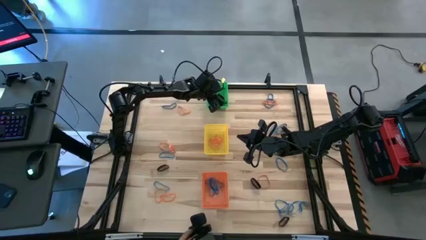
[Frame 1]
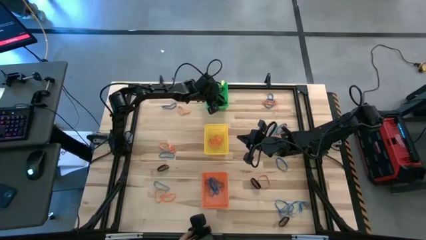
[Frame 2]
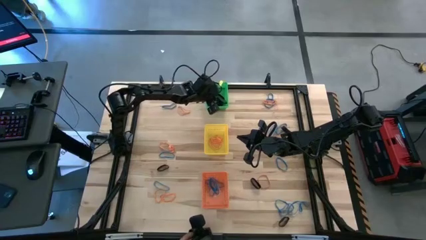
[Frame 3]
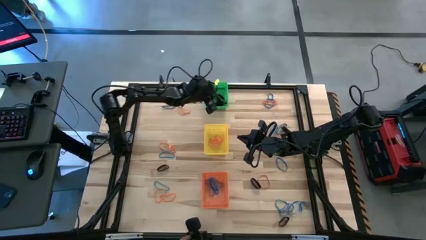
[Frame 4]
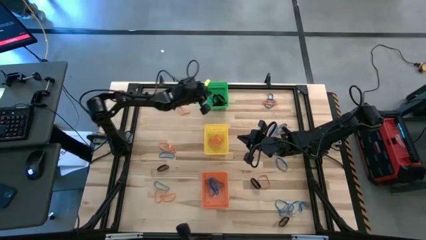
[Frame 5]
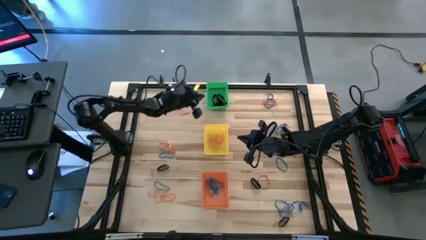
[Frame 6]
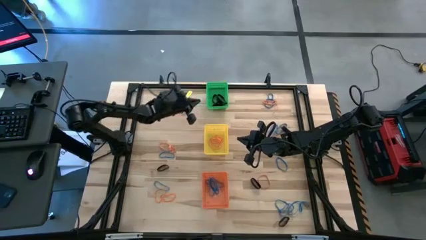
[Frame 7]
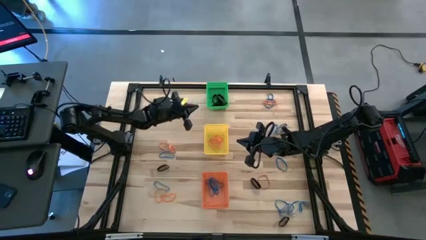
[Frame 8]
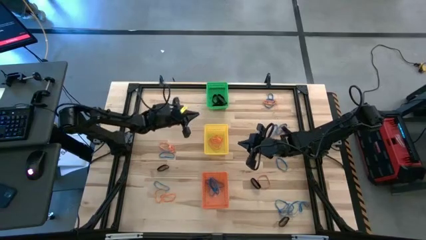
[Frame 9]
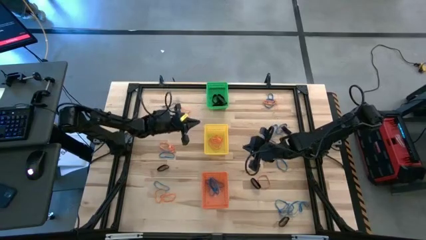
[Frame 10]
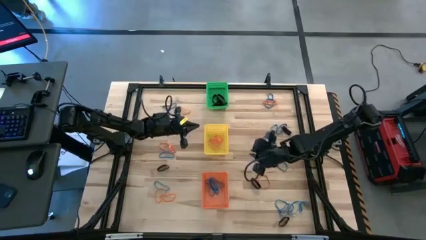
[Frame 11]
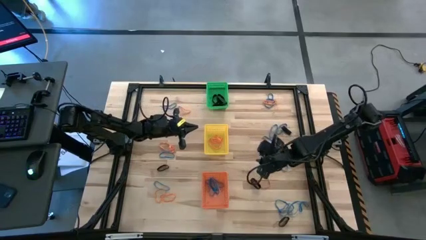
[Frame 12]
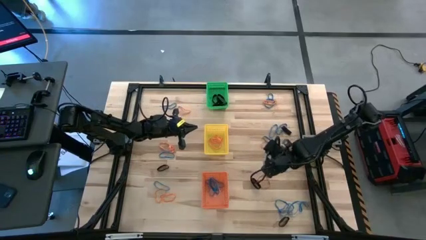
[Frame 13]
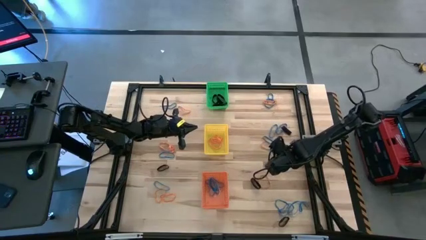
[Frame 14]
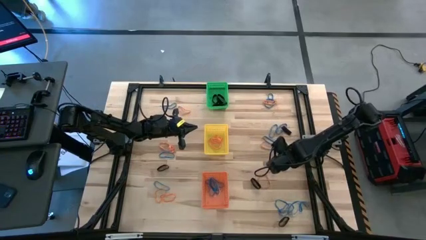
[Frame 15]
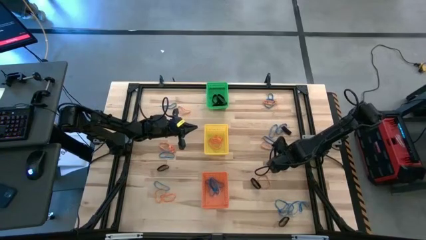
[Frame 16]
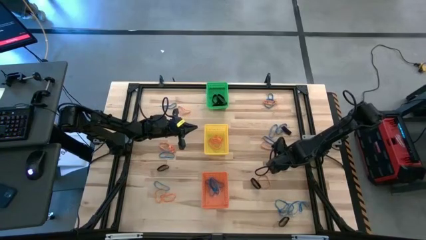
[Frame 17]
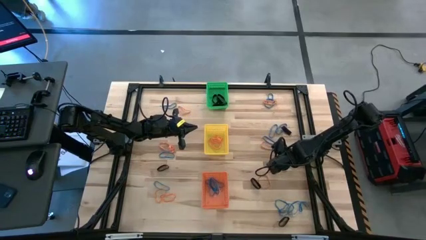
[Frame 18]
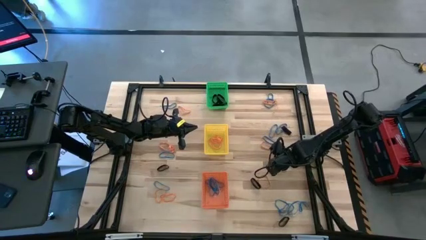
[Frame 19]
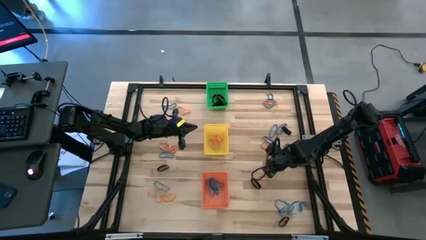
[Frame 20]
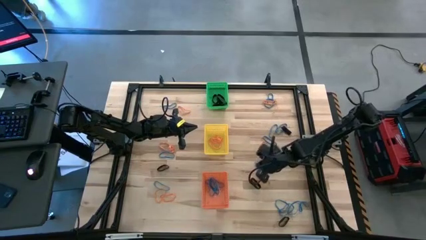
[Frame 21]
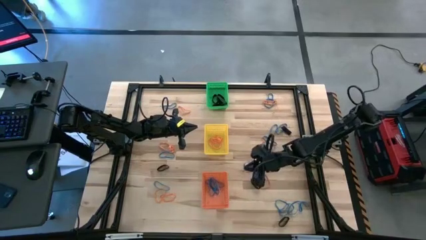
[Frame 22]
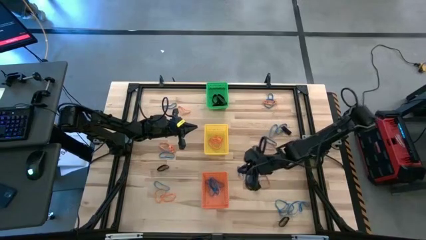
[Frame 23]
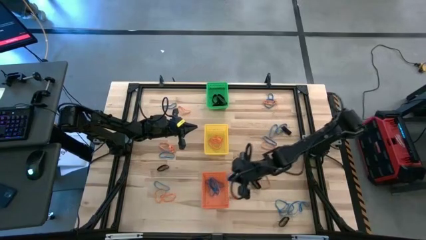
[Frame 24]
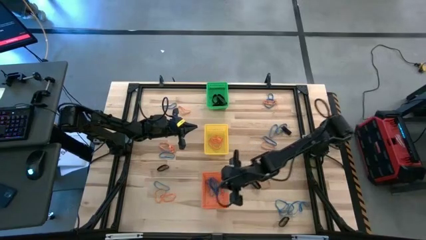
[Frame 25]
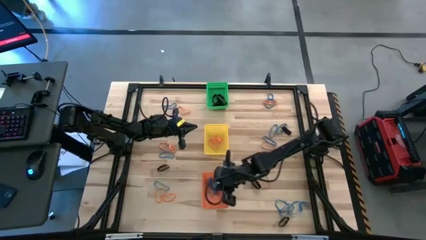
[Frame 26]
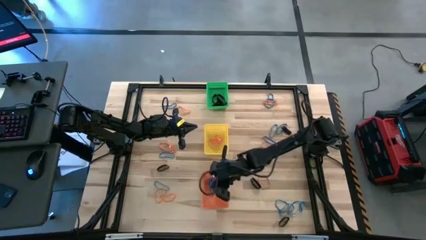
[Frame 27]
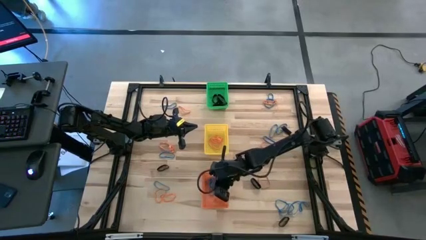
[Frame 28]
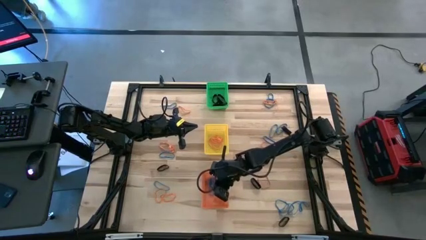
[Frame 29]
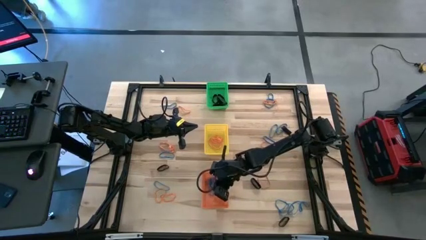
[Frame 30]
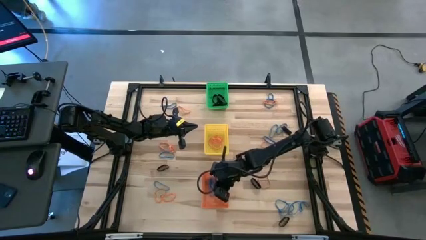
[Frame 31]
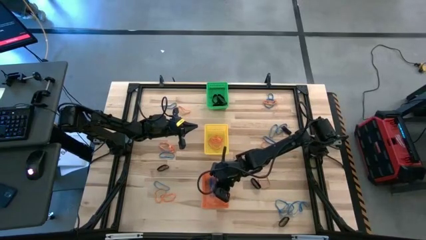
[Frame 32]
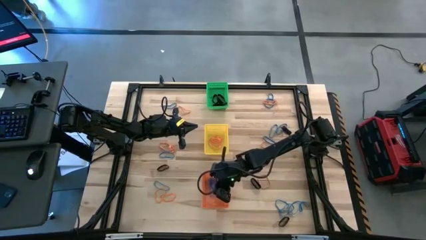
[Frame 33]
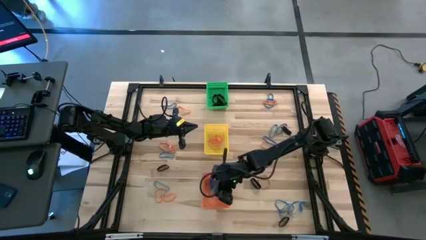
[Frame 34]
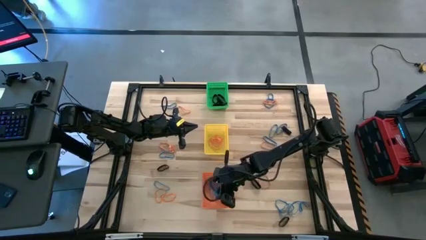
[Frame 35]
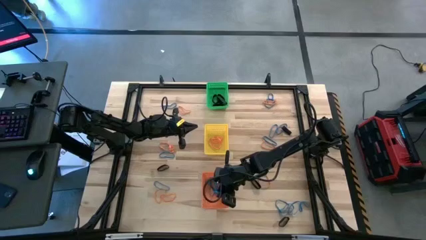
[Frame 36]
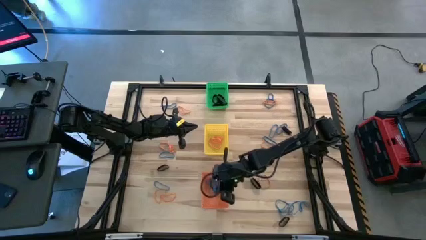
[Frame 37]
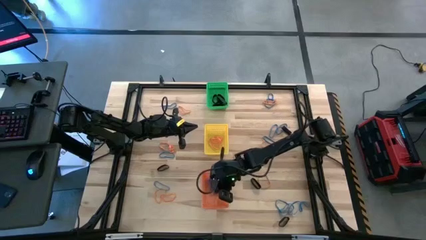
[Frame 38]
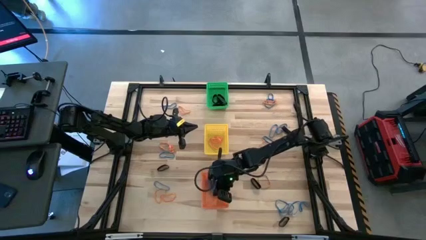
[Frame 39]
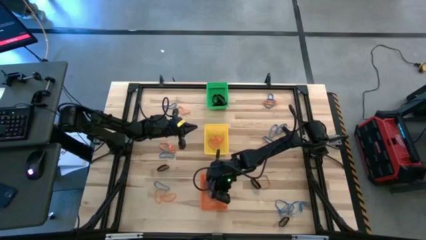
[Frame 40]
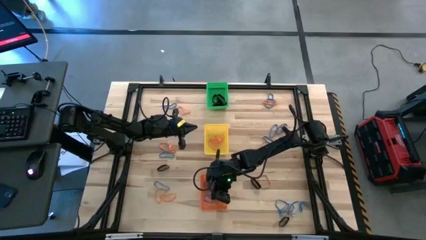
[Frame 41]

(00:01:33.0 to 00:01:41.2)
Task: Sort rubber bands into baskets
Put the blue rubber band into the orange bin

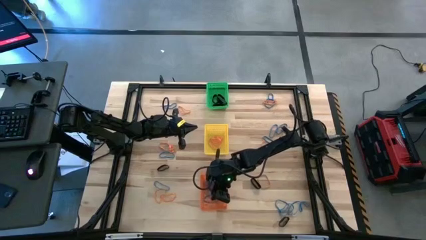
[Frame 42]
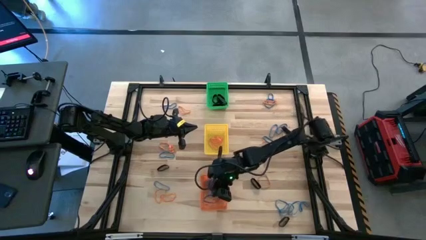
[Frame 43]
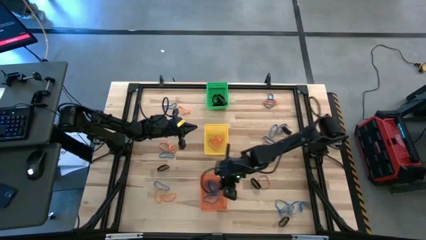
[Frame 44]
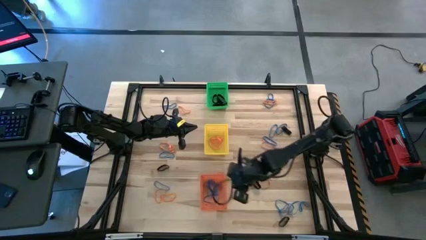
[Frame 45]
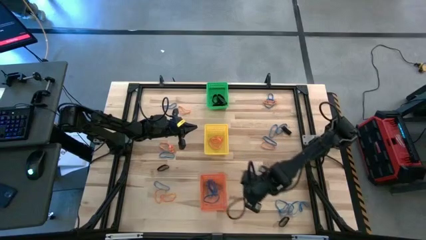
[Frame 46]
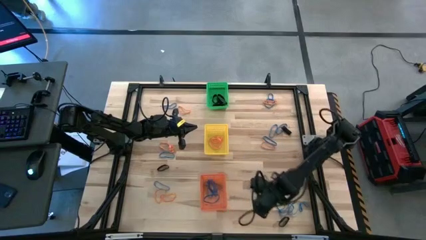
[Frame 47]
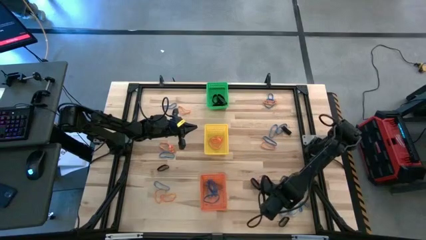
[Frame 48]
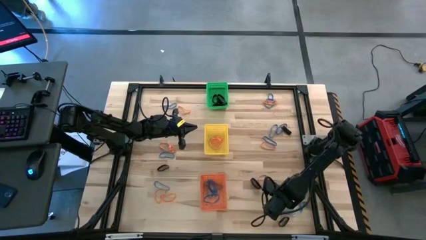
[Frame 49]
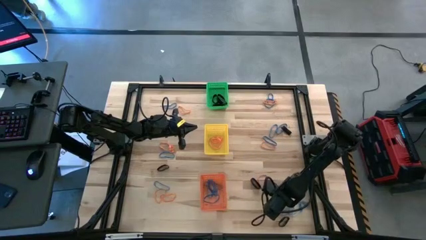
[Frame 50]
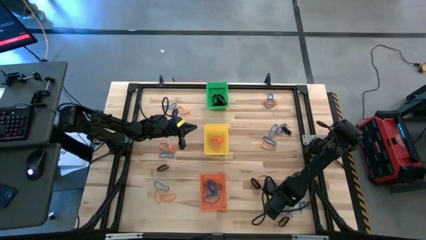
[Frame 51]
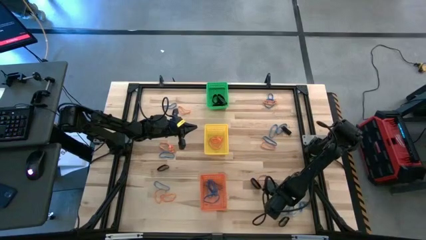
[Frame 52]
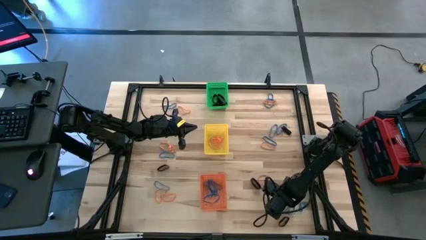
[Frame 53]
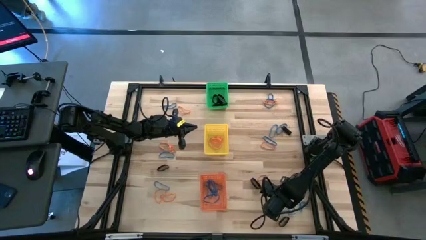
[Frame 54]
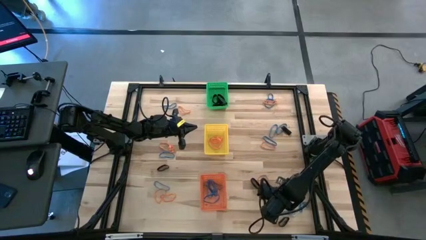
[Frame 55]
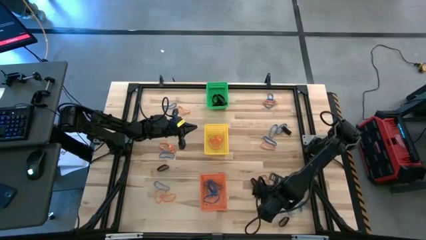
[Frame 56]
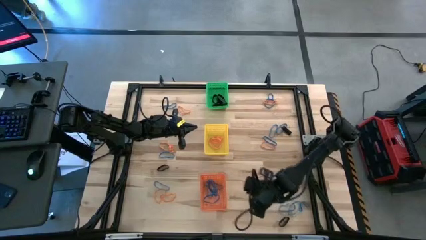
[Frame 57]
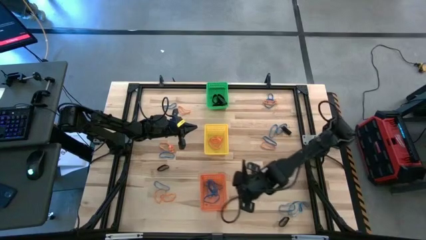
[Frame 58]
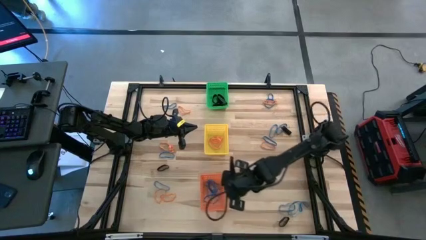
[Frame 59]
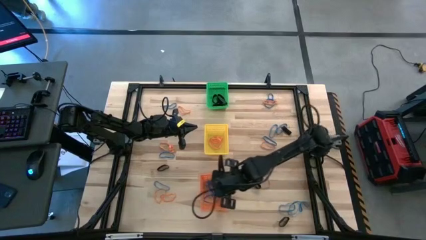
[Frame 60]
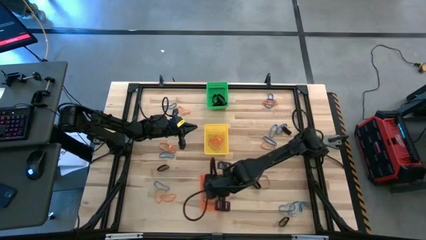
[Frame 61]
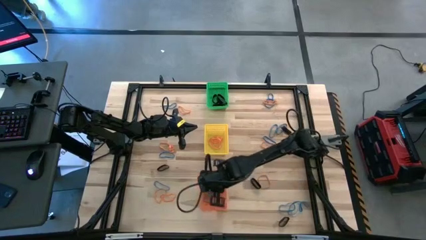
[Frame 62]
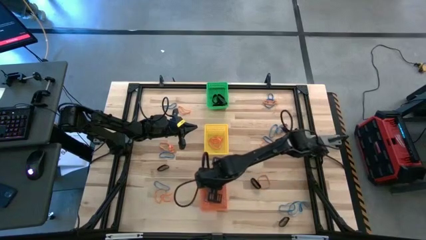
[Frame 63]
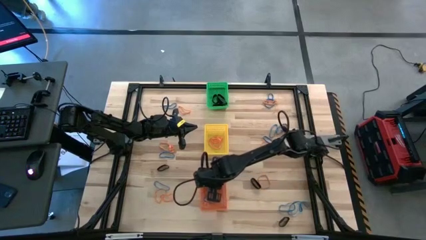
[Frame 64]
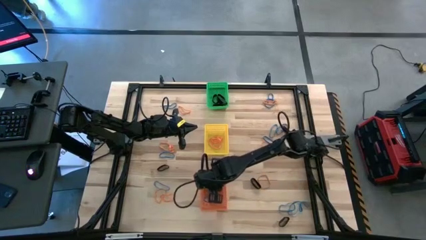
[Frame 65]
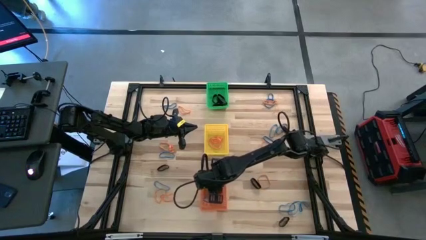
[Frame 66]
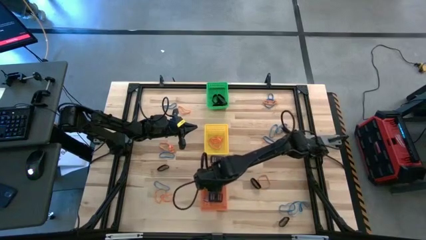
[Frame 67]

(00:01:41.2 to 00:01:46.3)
Put the blue rubber band into the orange bin

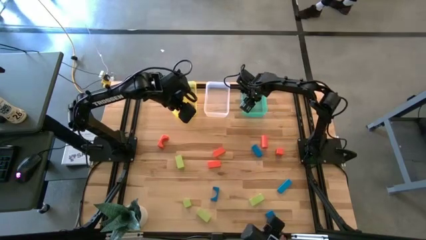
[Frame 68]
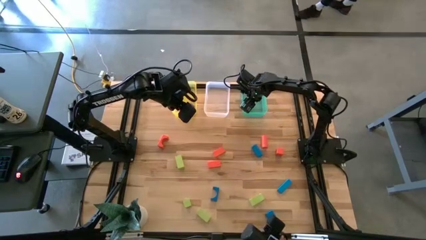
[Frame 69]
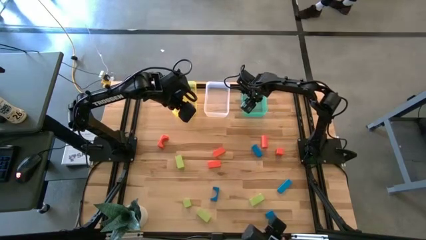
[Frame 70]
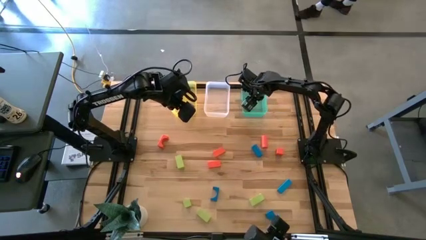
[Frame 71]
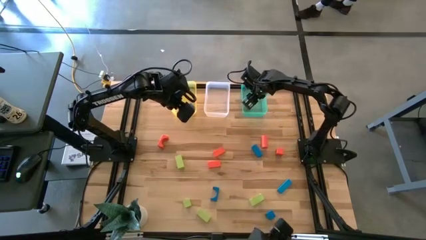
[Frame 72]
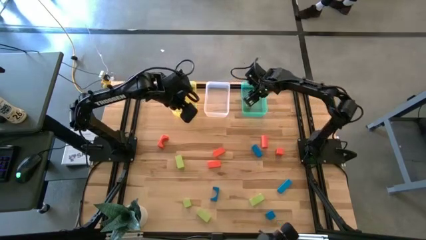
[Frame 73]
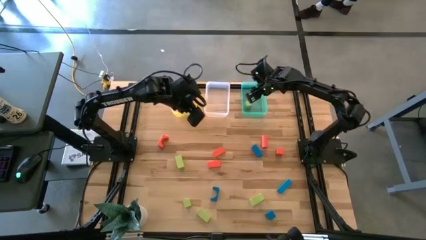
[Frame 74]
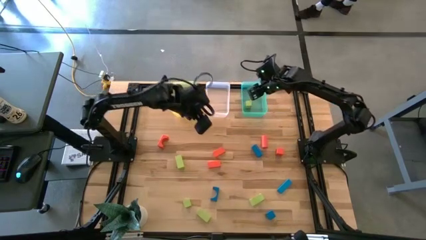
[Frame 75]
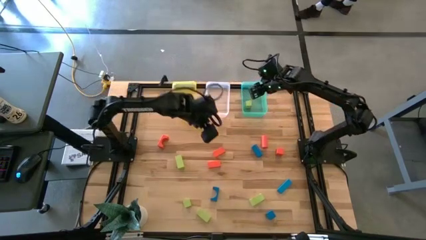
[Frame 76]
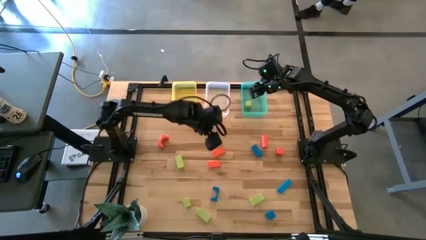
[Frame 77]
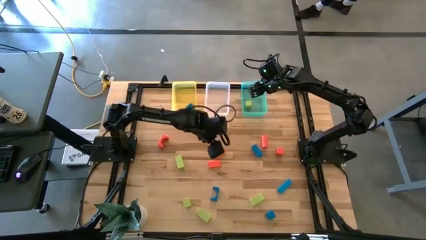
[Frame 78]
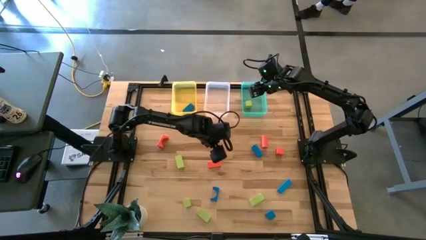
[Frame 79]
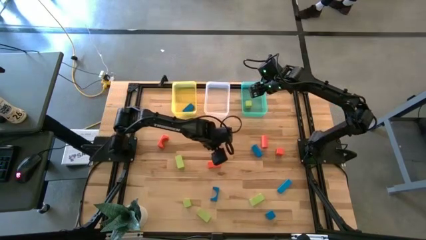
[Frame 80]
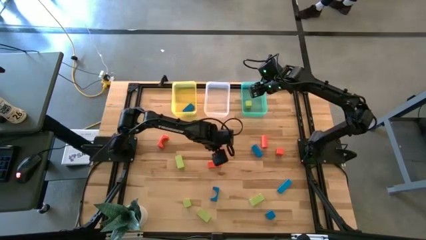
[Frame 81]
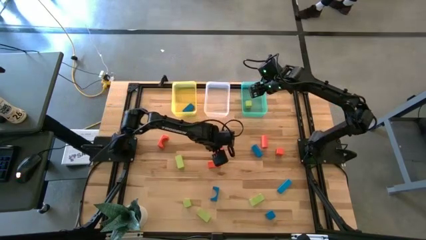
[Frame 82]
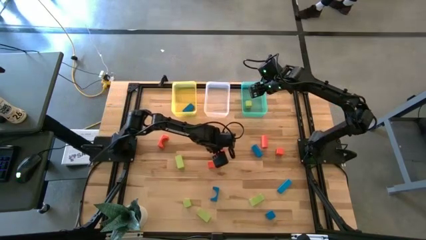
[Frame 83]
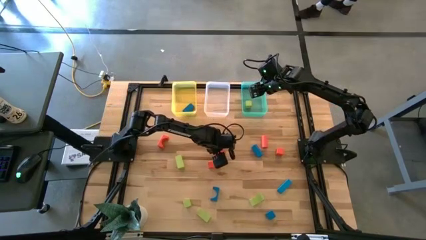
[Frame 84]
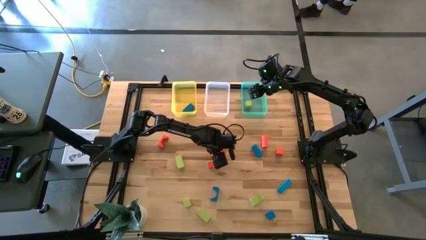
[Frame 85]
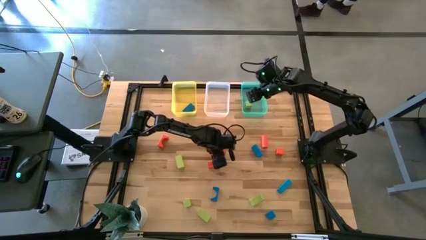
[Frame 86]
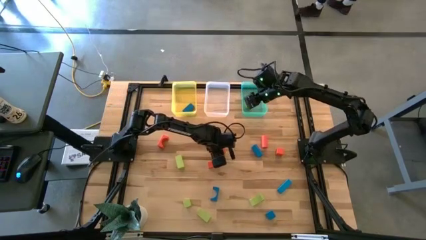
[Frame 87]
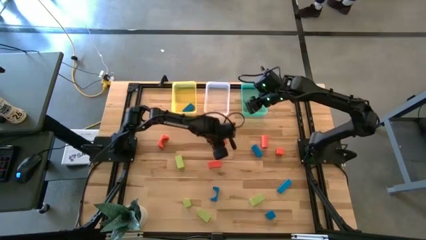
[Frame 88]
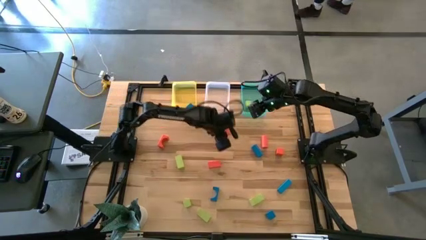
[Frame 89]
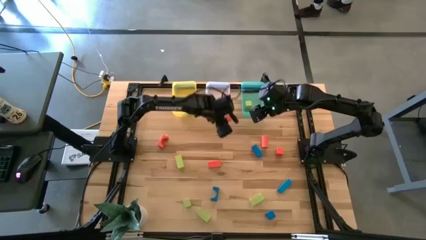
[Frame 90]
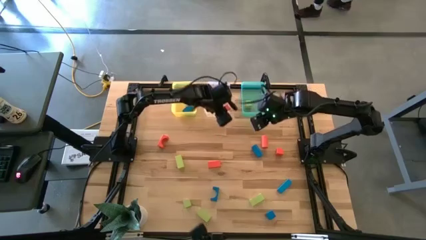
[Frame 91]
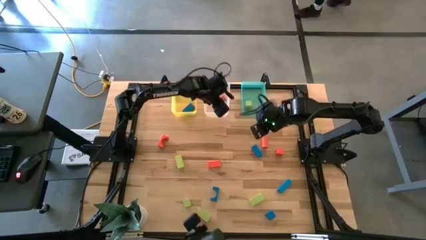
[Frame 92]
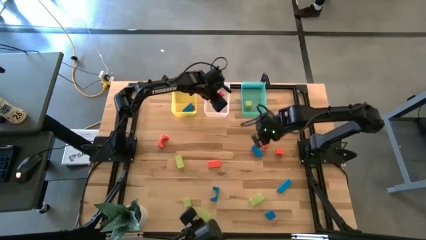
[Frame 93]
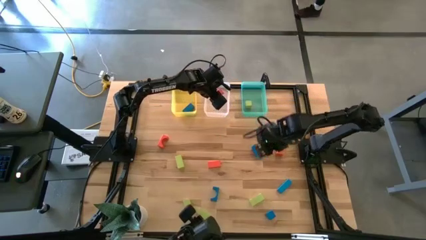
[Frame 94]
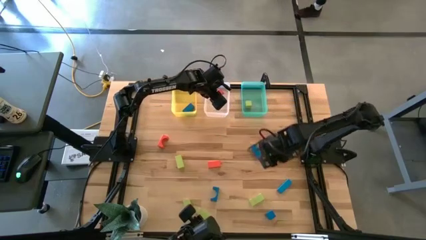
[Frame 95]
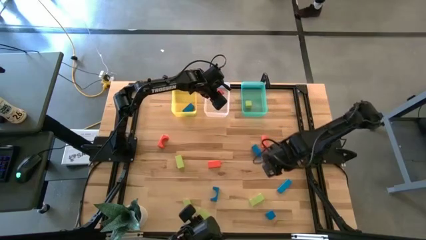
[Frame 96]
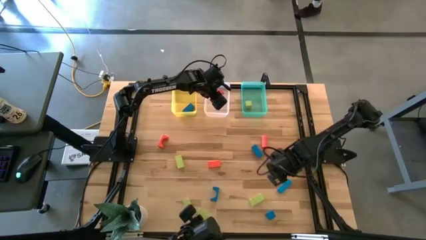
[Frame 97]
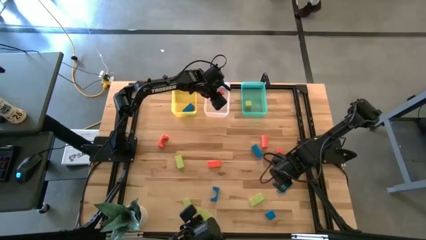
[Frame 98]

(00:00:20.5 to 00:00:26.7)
Task: Sort & place blocks by color
Put the orange block into the transparent bin
